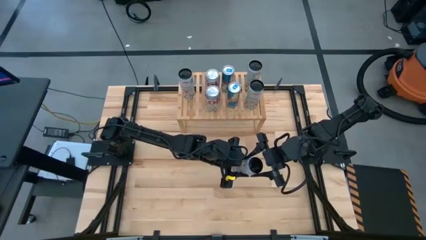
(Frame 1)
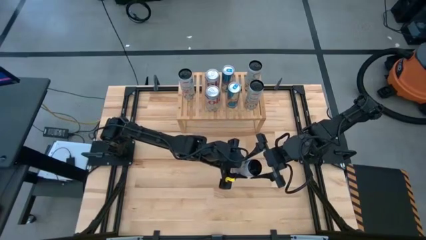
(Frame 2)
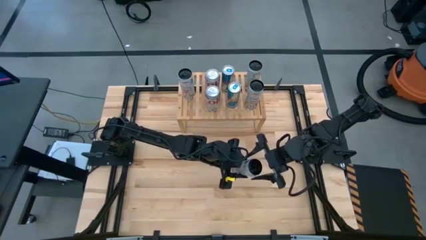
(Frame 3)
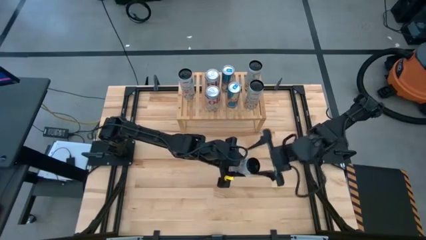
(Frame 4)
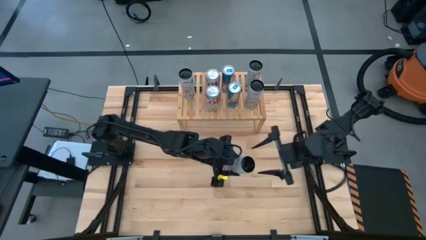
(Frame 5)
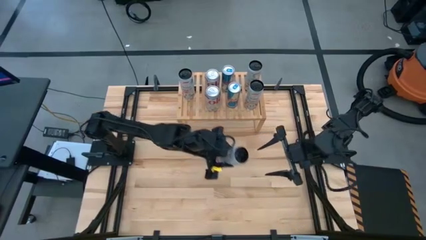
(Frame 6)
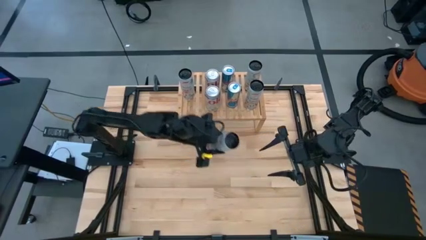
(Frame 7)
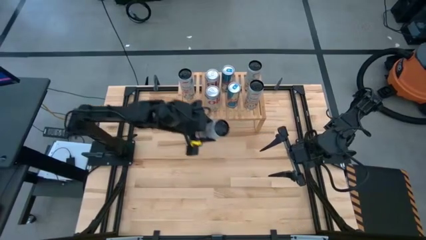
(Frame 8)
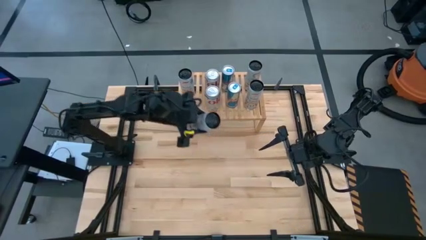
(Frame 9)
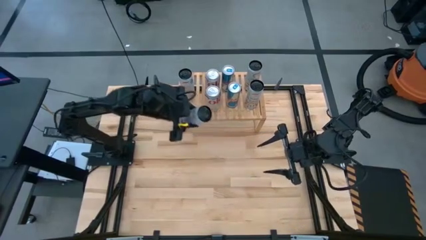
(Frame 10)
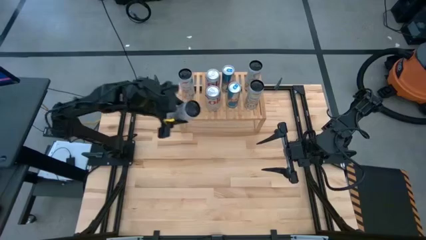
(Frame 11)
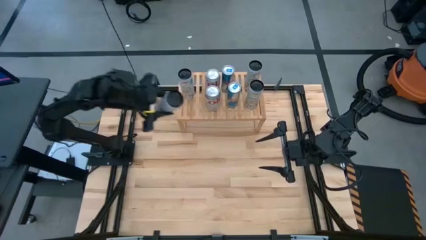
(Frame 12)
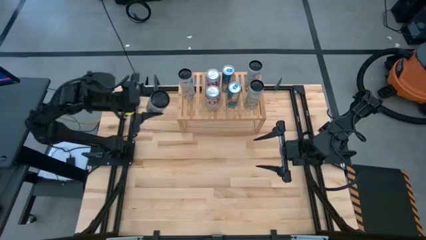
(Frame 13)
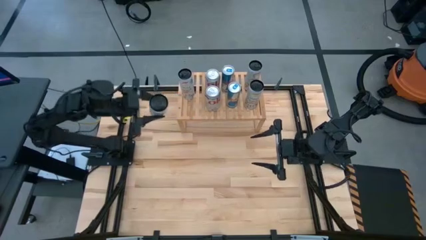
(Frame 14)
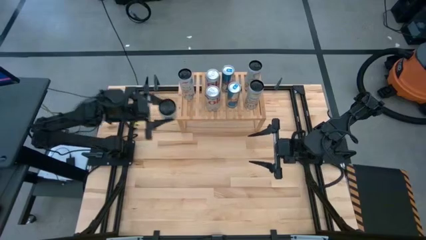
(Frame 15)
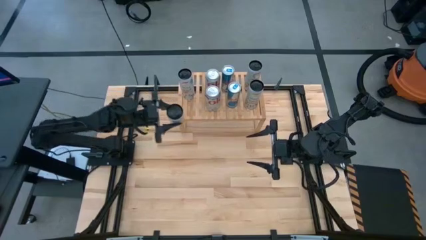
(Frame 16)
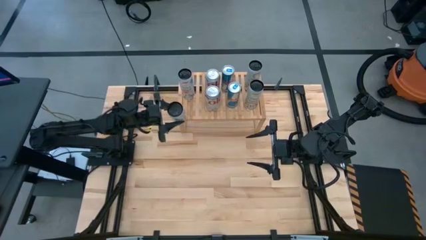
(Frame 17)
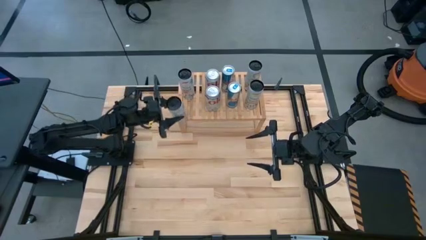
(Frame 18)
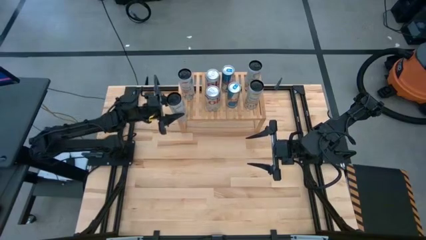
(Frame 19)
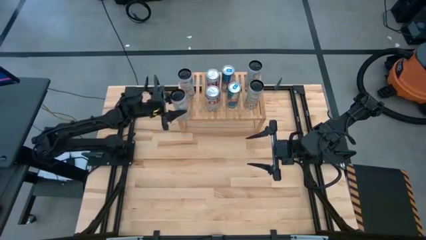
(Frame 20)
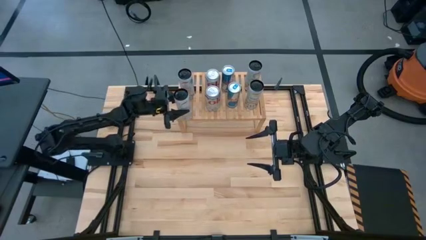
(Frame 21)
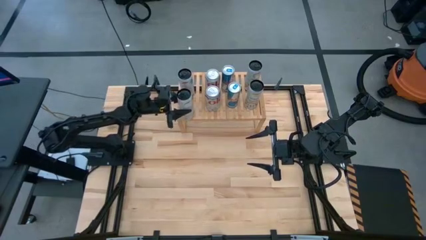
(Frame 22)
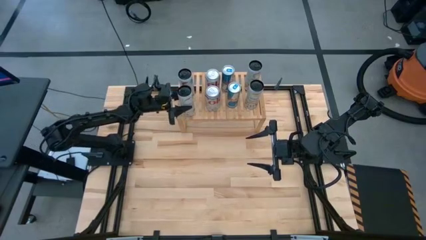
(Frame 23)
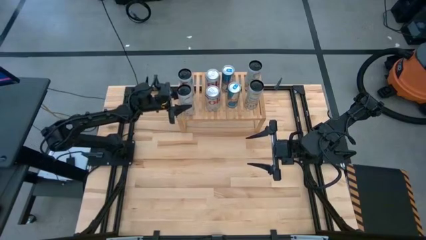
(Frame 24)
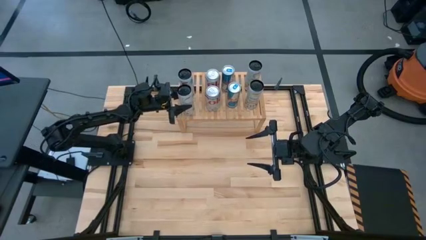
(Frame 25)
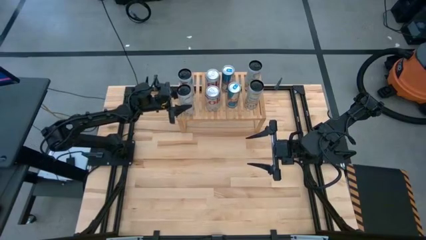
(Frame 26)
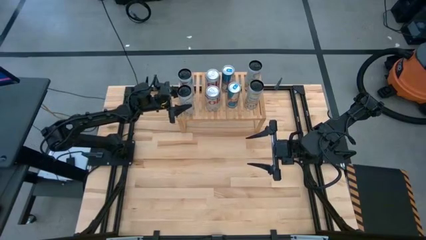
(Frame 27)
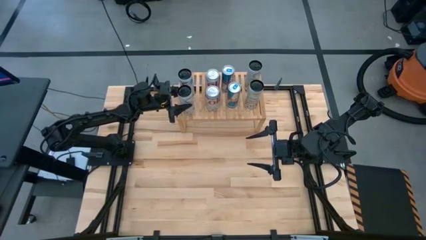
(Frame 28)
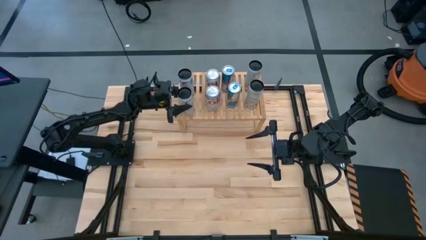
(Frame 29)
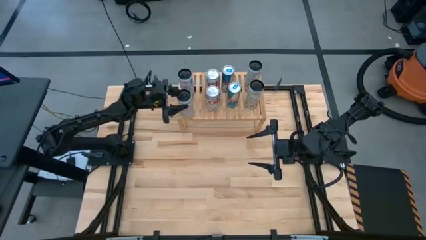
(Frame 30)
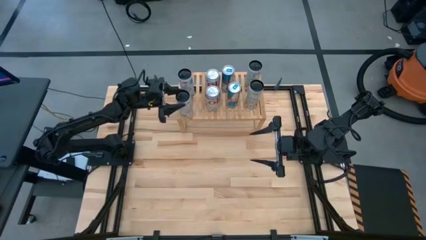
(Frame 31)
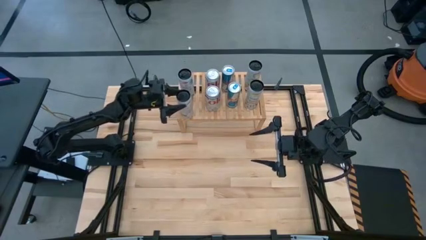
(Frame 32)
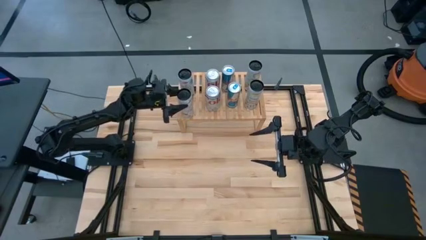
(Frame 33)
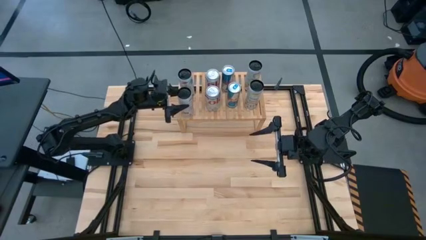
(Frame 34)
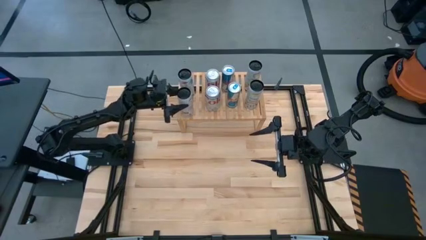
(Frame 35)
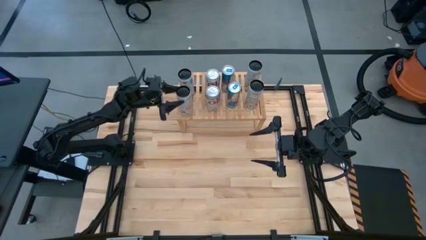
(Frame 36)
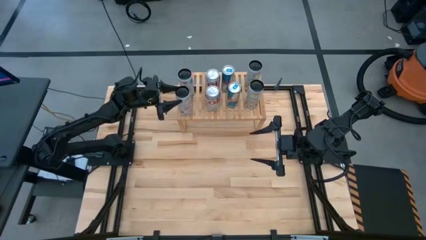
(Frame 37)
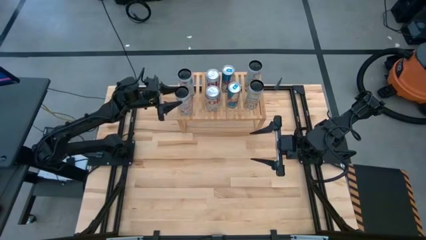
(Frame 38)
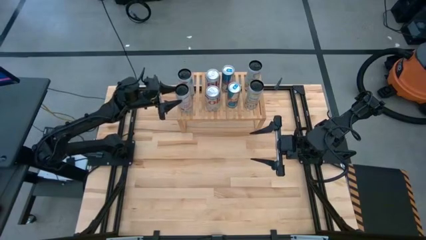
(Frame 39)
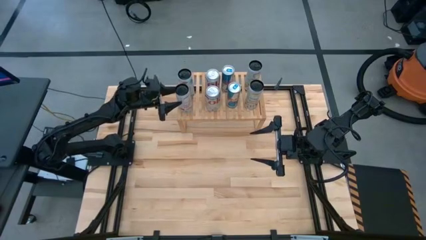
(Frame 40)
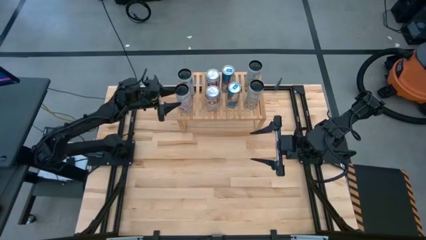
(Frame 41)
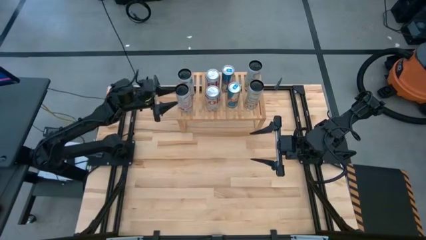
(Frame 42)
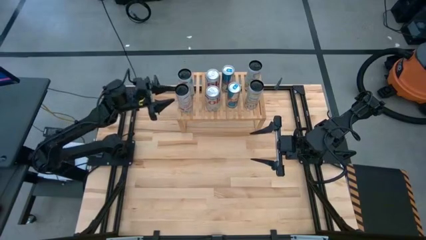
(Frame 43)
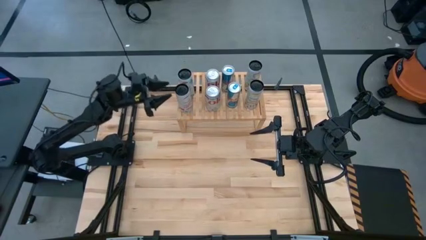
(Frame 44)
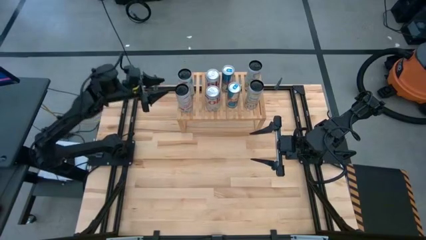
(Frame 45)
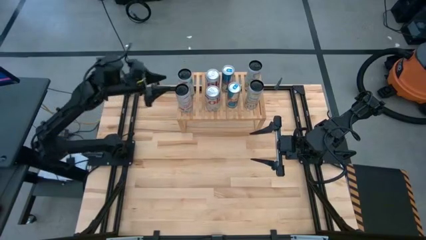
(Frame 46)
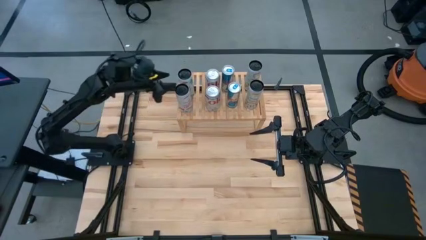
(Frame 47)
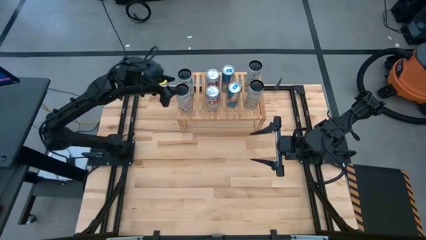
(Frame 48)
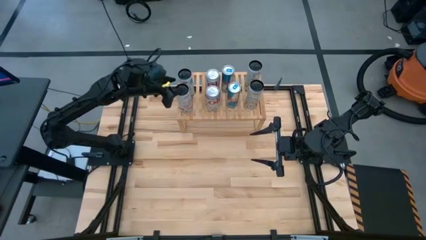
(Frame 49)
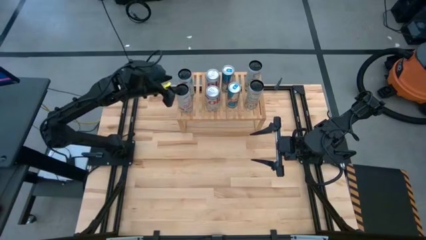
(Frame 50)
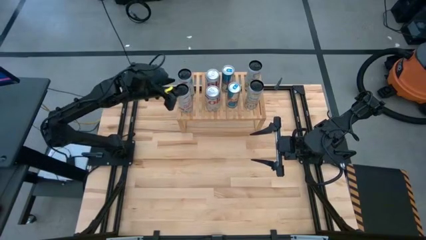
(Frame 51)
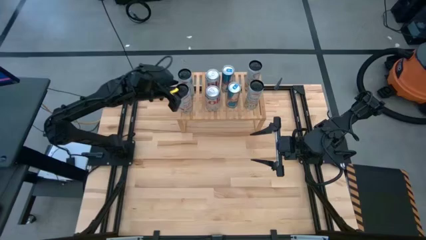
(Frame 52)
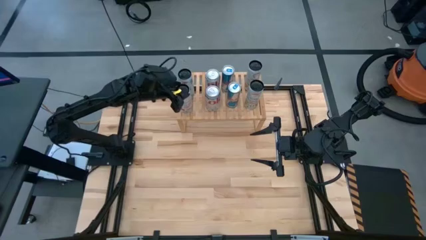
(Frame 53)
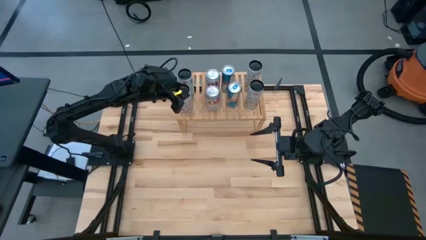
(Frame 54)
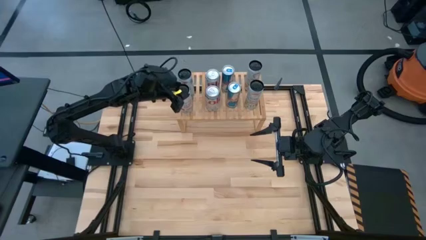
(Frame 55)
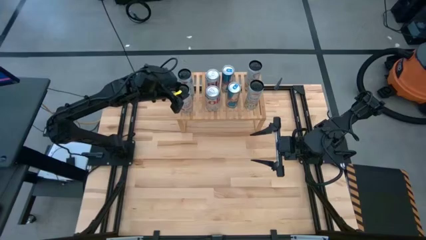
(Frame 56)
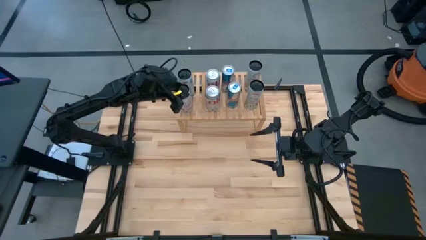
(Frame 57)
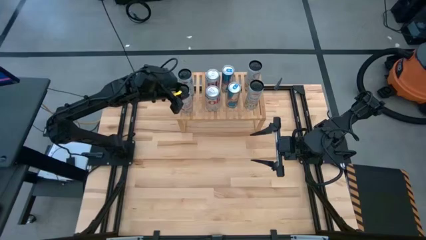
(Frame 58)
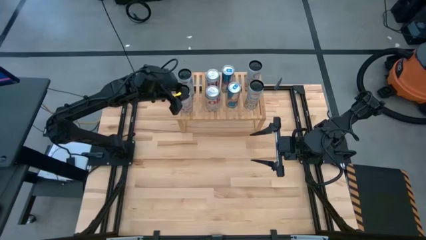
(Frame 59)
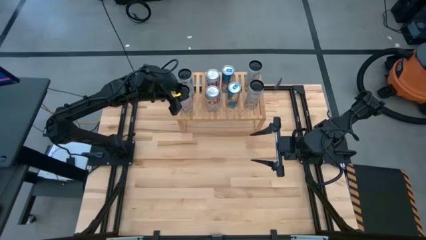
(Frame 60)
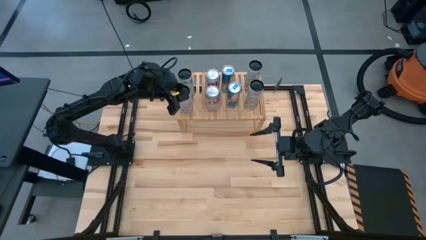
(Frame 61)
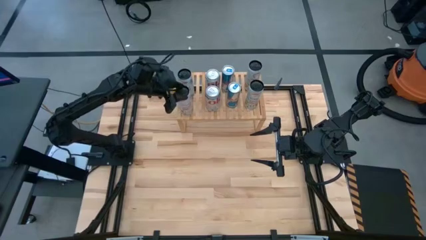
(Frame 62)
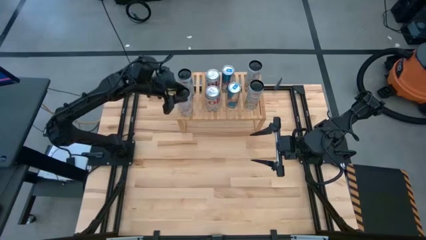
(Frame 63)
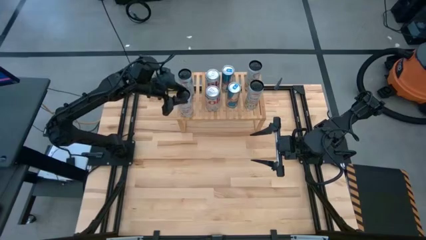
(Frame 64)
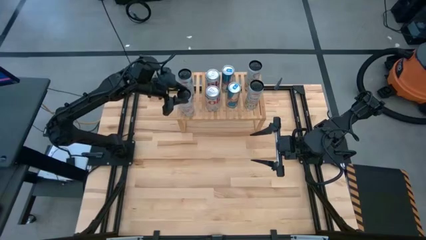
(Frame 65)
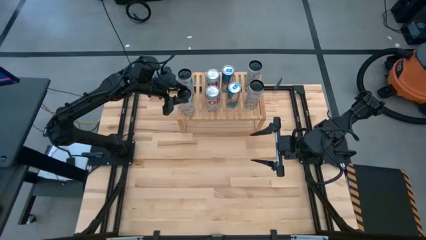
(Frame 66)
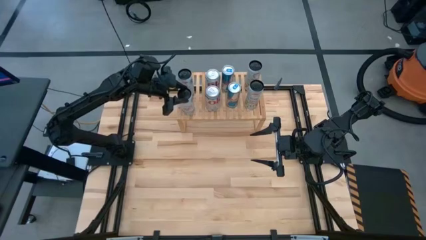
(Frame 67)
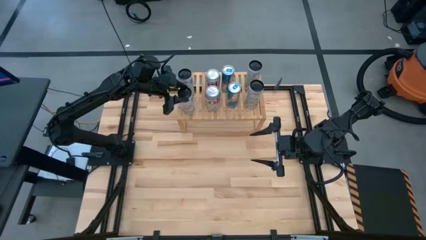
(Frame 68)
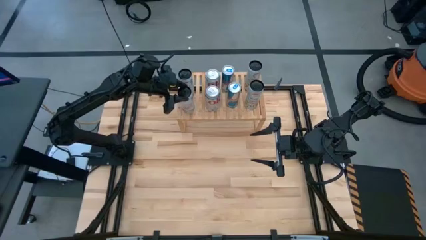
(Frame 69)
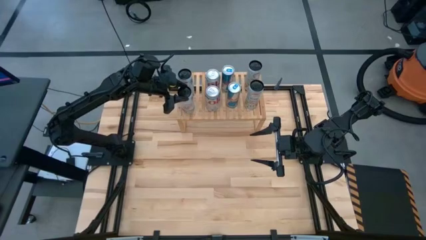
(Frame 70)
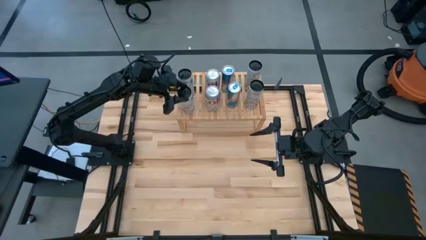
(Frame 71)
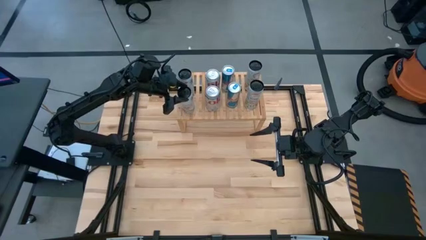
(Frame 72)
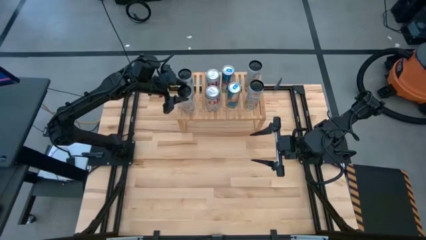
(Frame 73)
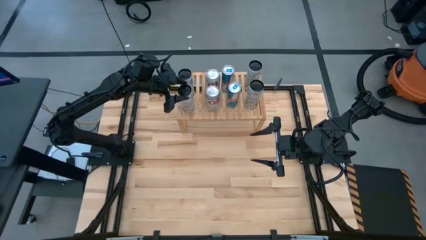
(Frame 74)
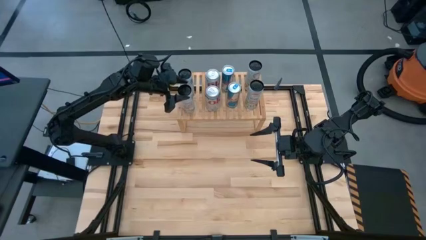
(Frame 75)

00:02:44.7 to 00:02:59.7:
Task: Place canned beverage on shelf
Put the white pink soda can on the shelf aligned with the other white pink soda can
